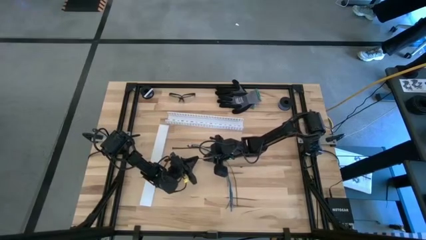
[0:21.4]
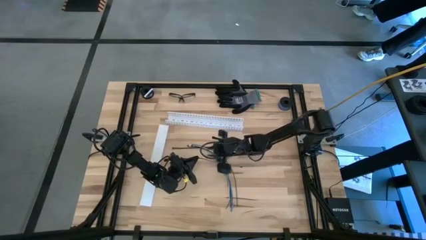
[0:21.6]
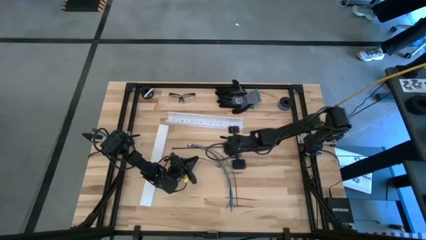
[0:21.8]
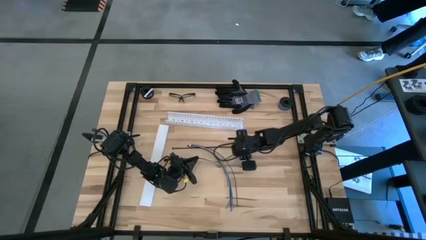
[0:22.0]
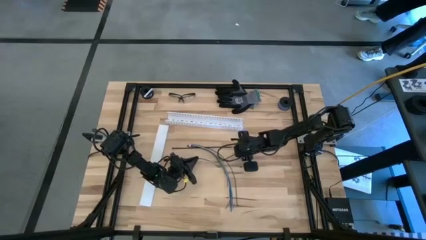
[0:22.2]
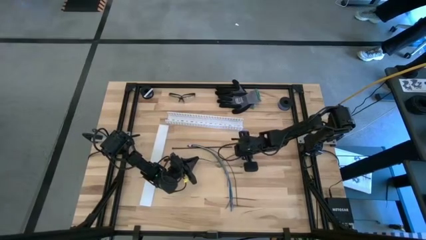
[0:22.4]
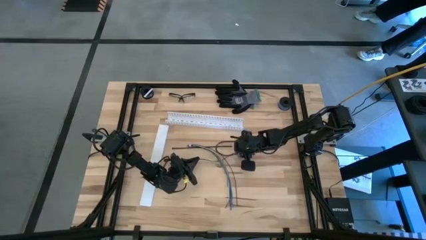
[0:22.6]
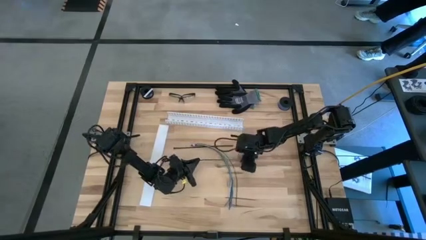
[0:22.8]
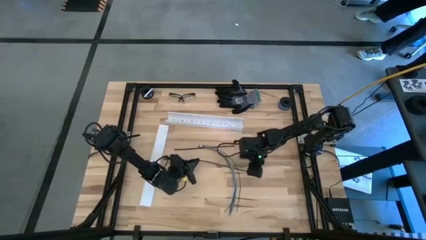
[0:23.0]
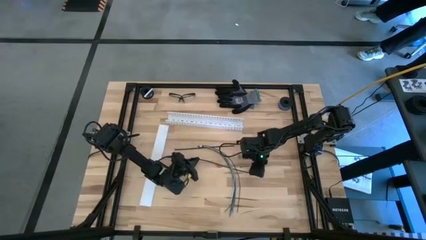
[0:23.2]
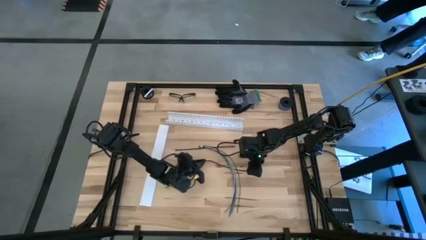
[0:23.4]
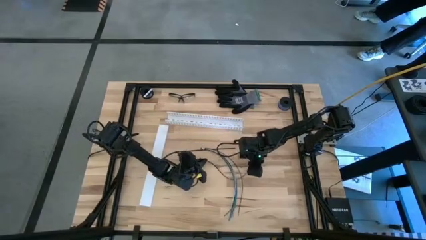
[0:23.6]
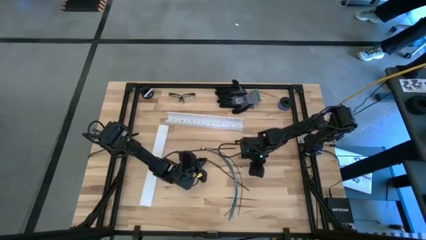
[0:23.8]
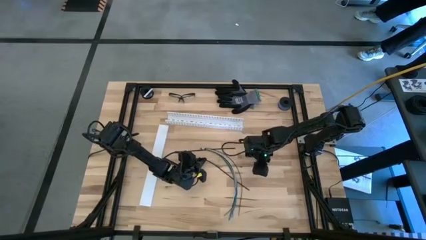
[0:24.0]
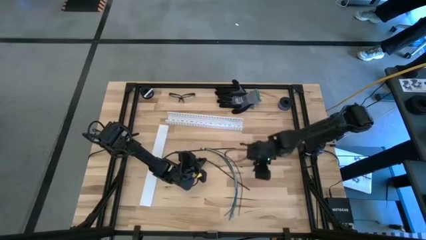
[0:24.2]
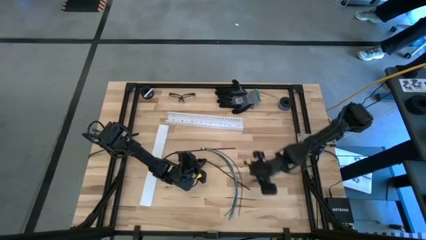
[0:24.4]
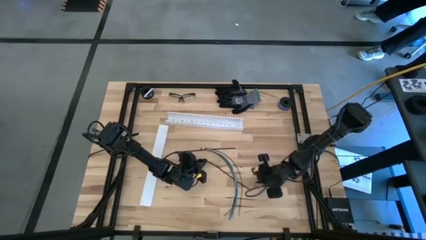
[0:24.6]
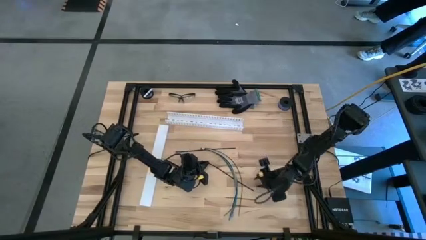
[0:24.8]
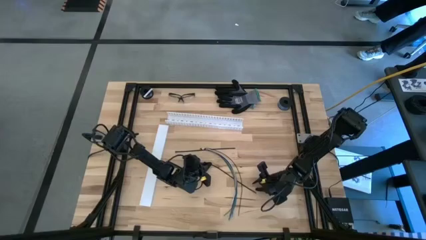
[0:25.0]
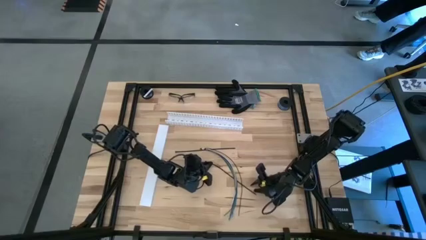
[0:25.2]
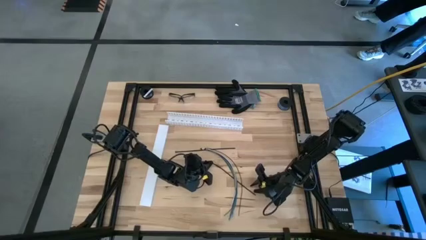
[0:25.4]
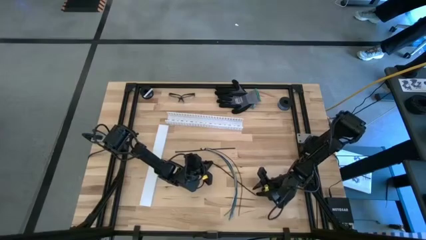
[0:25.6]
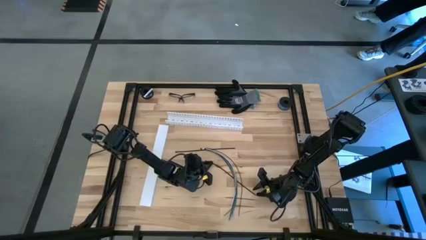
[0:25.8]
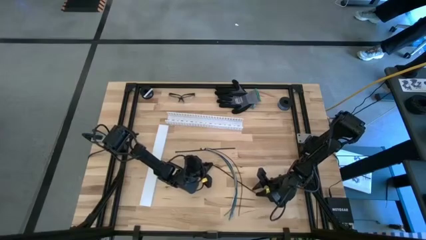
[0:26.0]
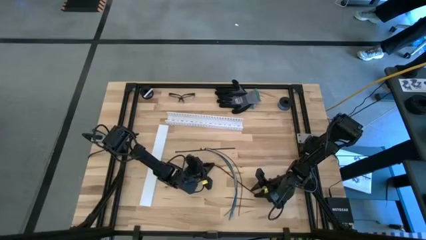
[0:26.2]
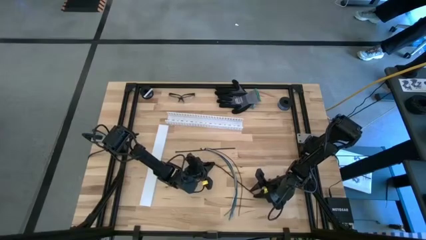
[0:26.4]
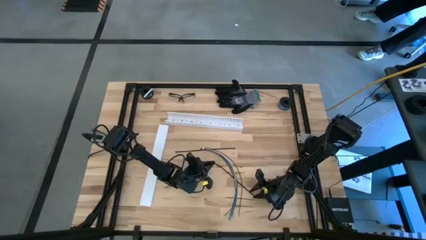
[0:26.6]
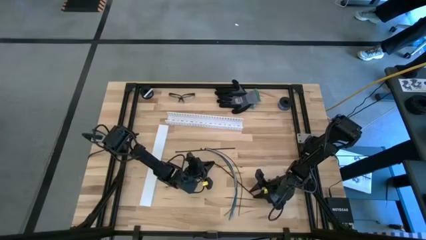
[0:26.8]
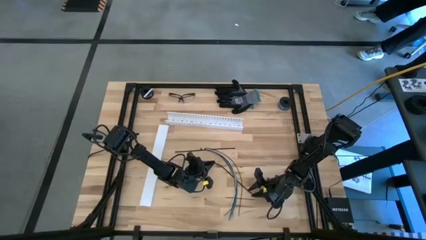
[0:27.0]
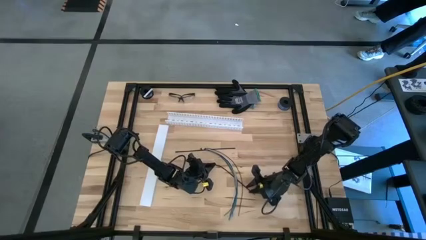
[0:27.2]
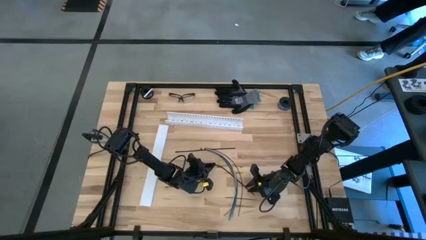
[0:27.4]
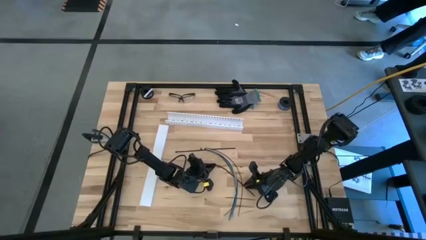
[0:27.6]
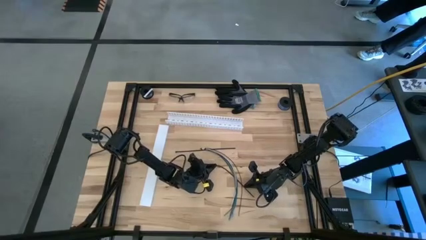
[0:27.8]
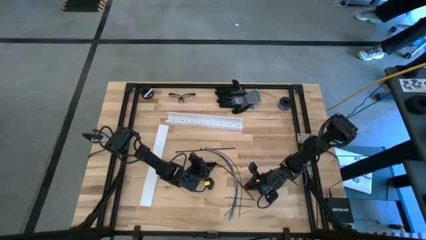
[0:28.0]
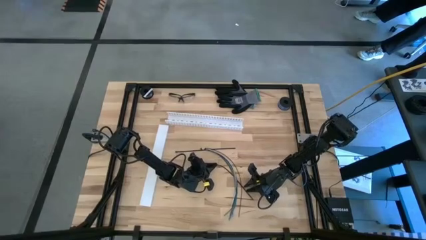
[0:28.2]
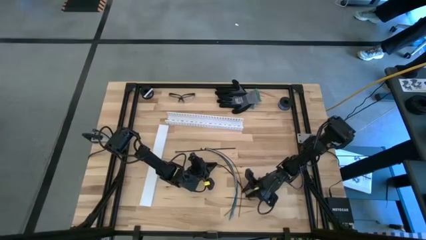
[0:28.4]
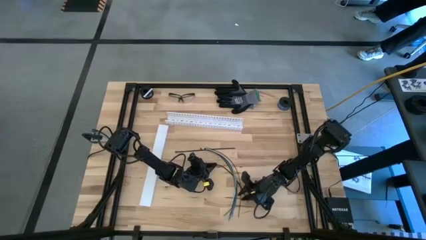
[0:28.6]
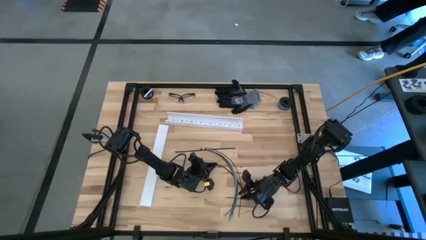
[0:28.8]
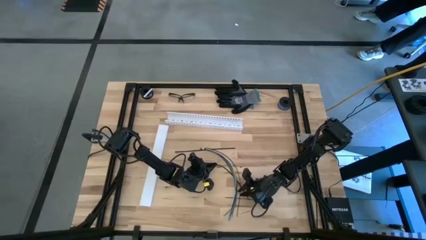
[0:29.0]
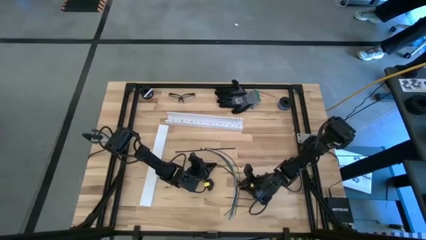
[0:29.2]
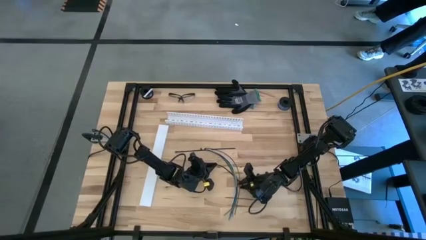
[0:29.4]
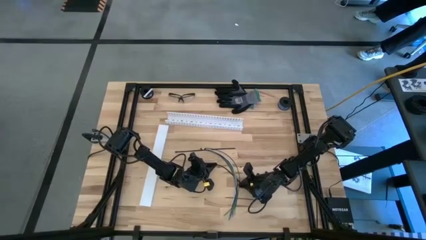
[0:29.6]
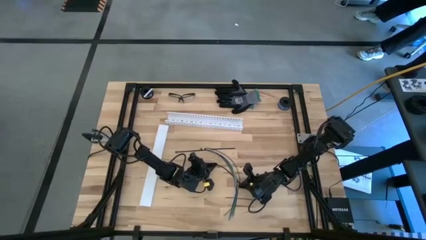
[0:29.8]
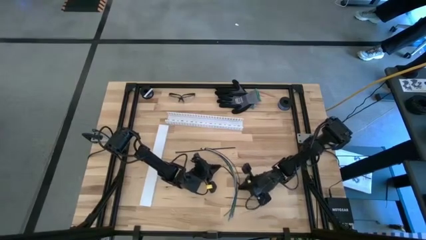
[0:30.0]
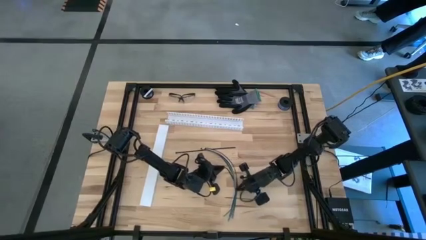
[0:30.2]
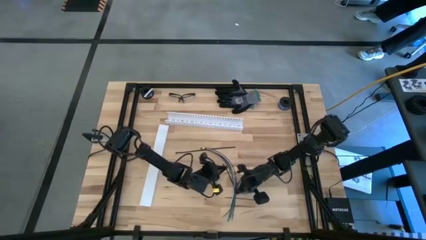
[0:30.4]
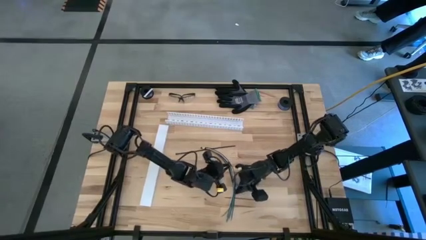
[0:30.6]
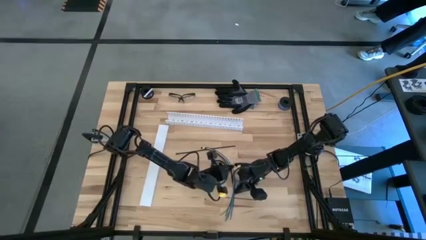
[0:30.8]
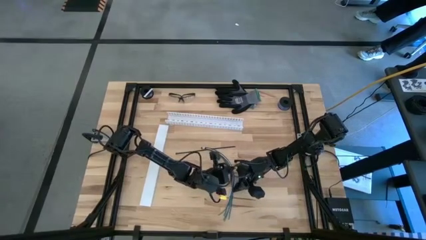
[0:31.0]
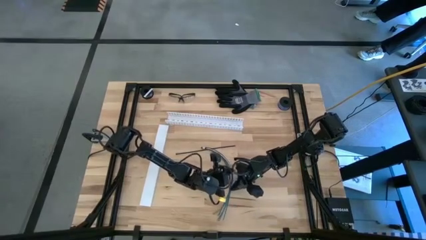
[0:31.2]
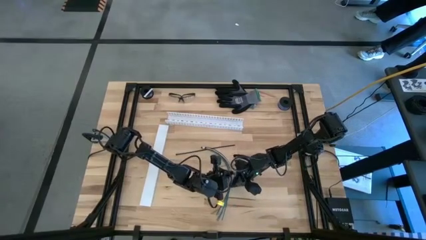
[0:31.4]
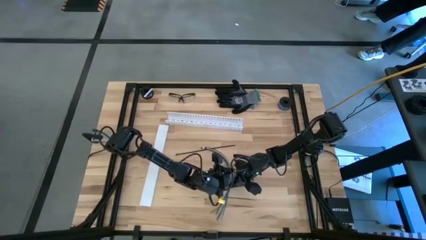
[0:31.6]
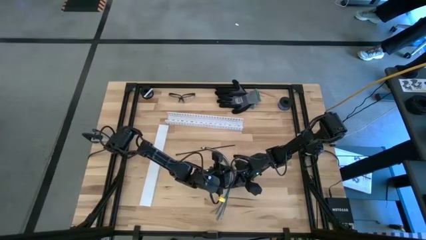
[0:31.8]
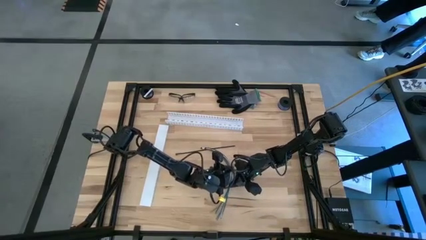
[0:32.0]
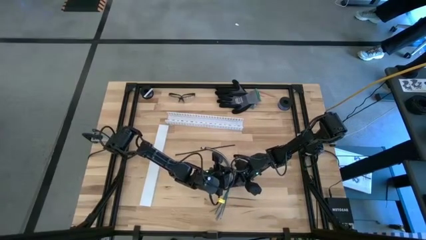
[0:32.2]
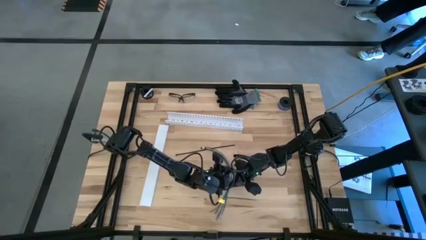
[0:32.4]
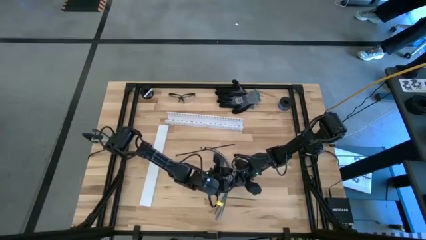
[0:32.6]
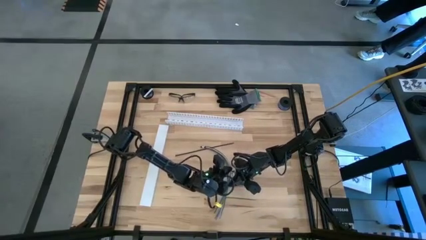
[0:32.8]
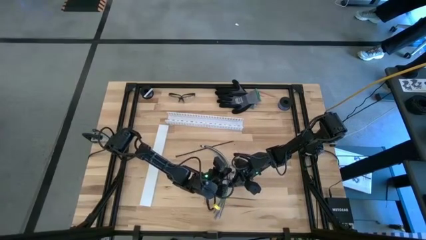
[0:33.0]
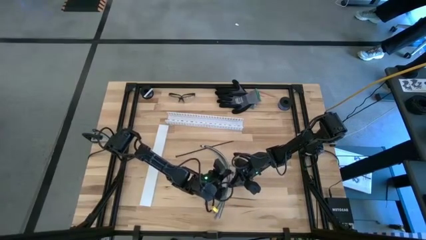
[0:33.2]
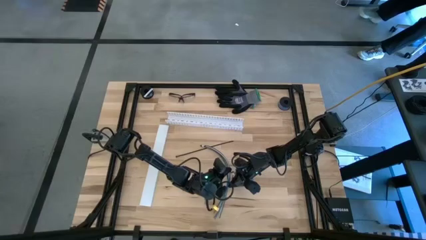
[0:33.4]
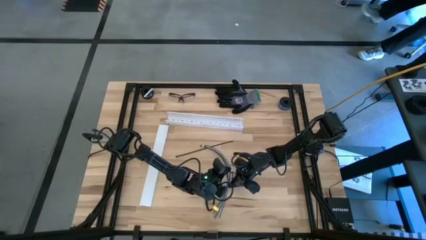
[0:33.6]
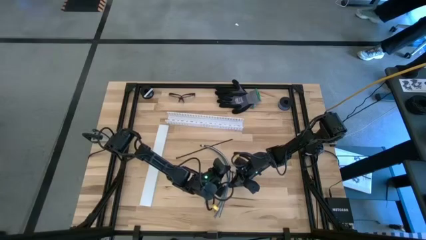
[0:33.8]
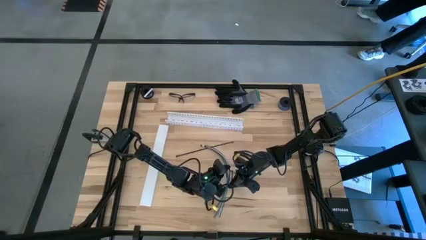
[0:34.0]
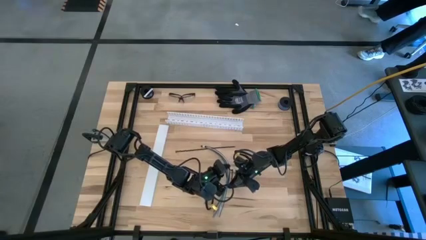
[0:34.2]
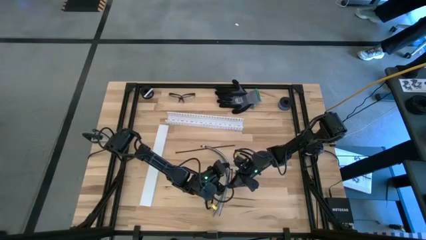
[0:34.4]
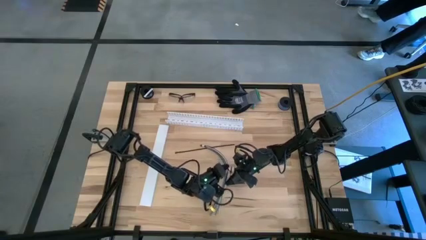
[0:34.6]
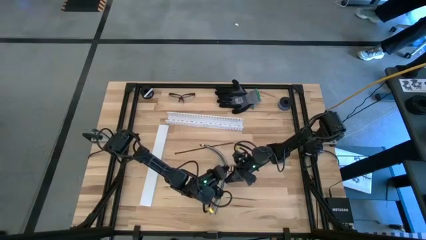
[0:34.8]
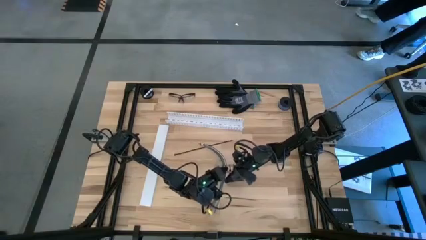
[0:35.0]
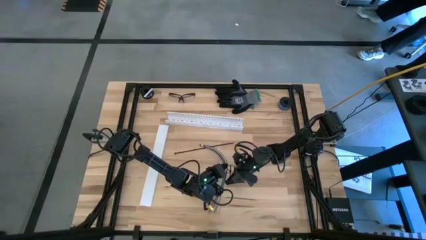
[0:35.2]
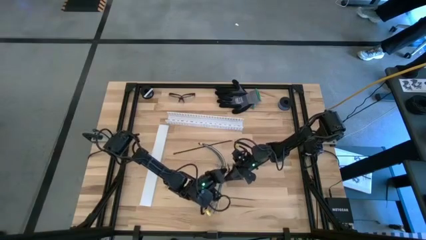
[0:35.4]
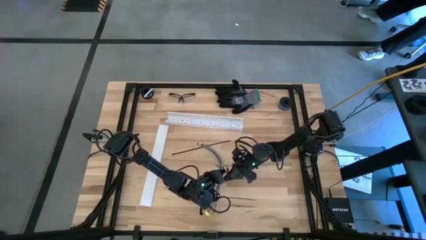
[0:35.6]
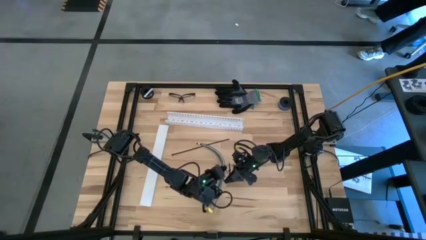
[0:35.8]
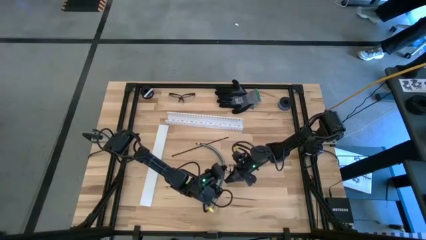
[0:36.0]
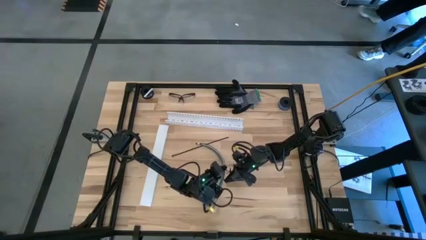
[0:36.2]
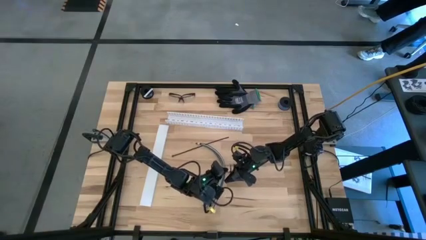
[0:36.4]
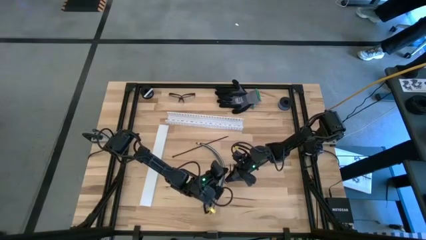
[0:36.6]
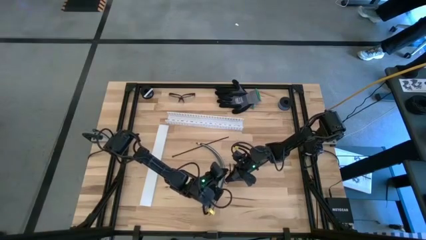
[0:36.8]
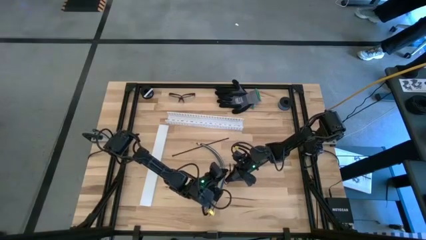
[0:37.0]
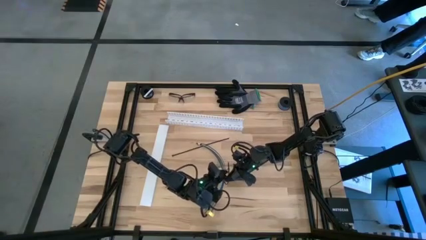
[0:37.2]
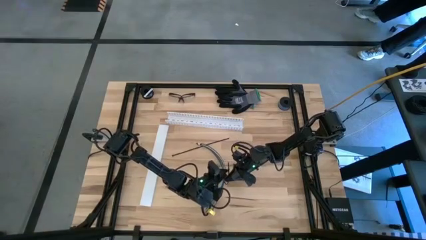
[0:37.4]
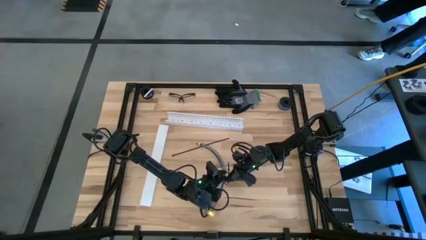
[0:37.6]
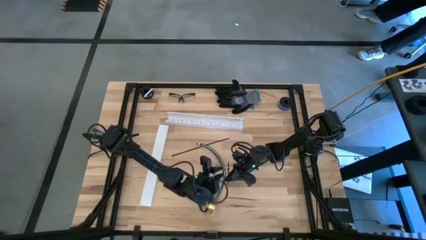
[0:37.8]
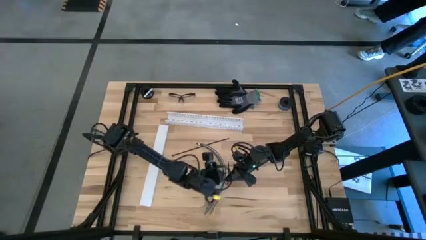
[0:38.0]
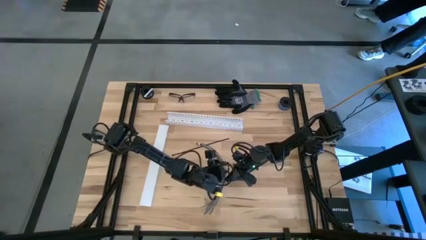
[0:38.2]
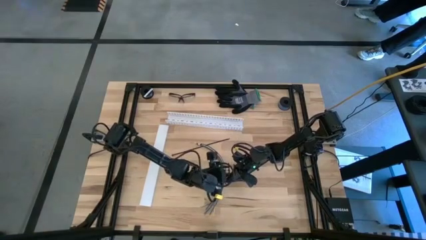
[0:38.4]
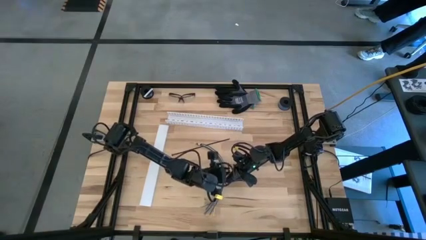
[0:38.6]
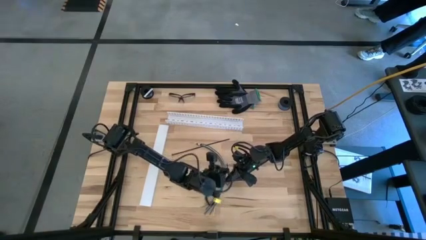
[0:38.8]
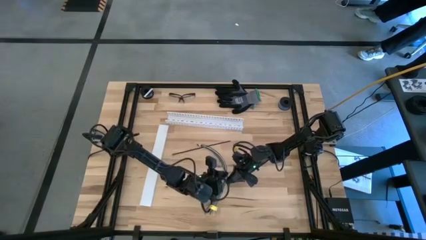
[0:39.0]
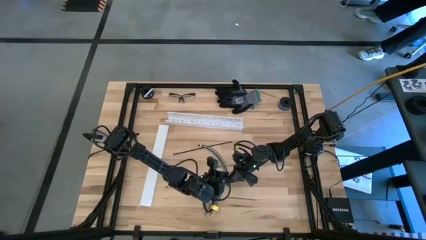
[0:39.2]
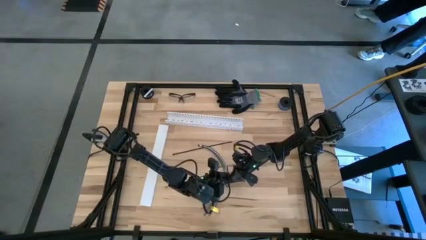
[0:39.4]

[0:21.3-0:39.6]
Task: Ziptie cables
Wrap the black zip tie on the cable
